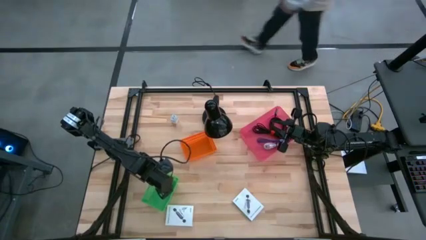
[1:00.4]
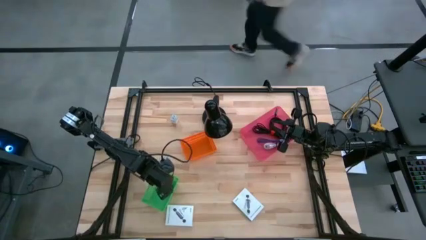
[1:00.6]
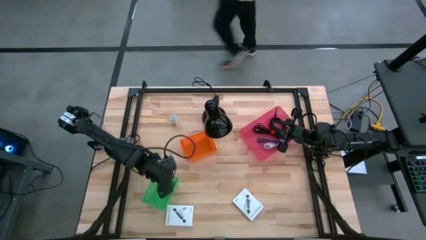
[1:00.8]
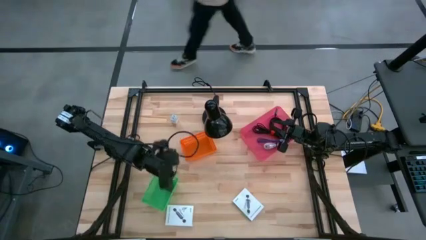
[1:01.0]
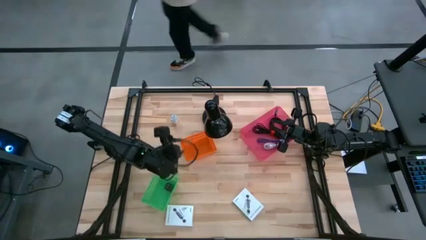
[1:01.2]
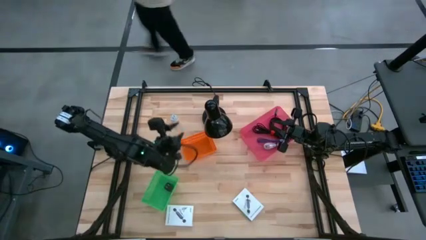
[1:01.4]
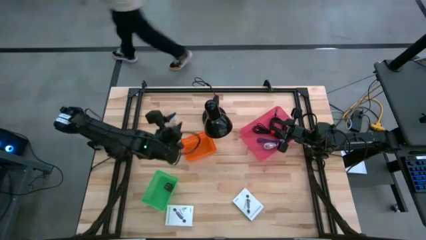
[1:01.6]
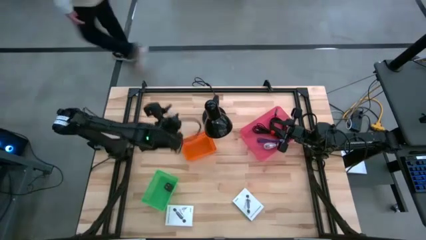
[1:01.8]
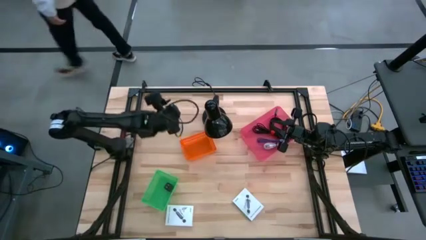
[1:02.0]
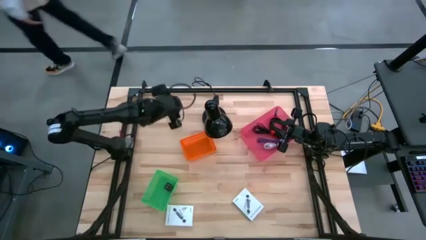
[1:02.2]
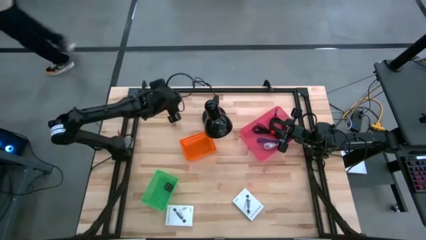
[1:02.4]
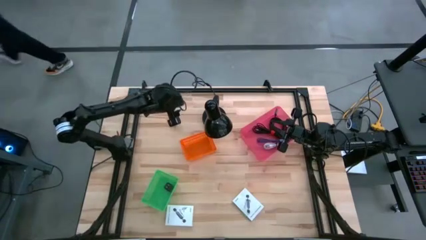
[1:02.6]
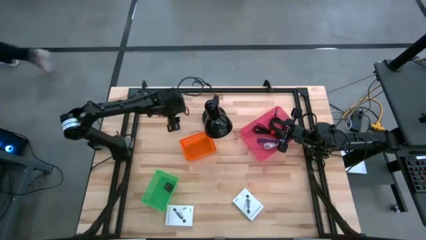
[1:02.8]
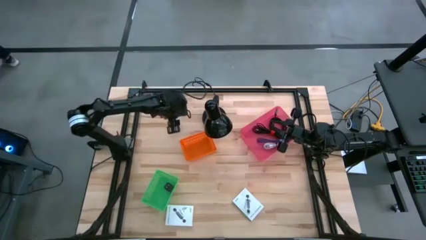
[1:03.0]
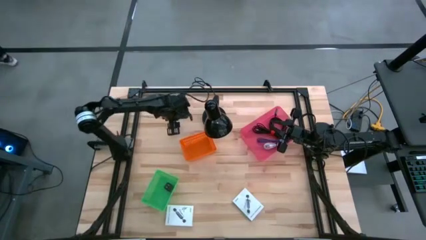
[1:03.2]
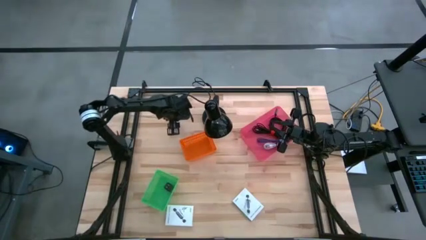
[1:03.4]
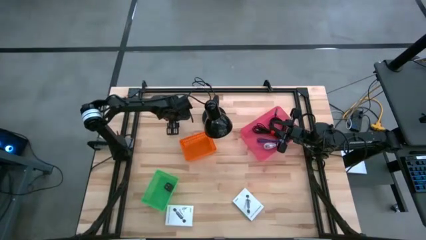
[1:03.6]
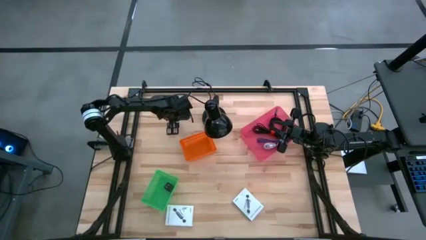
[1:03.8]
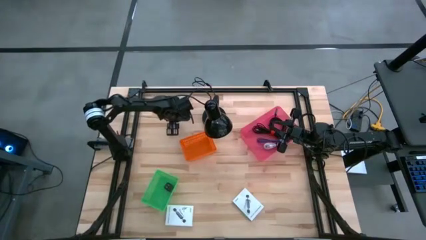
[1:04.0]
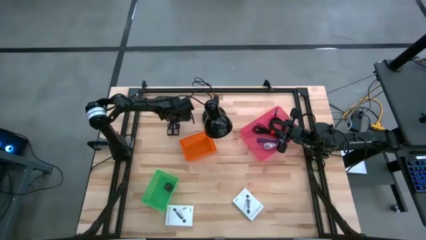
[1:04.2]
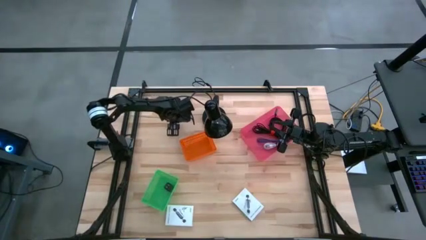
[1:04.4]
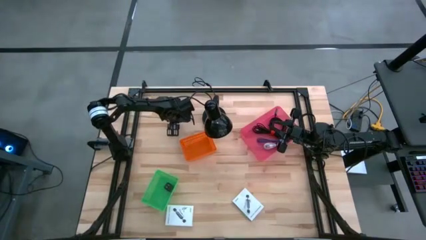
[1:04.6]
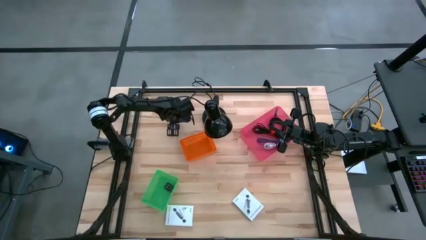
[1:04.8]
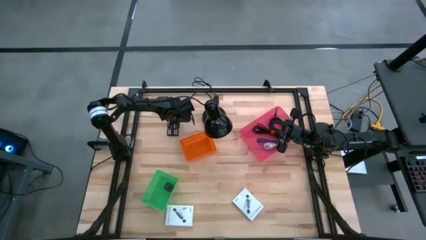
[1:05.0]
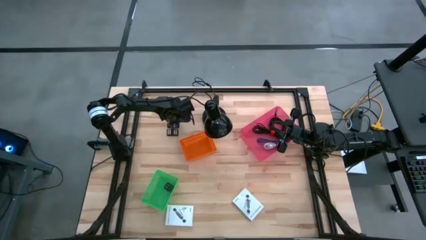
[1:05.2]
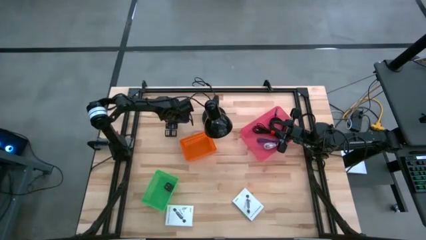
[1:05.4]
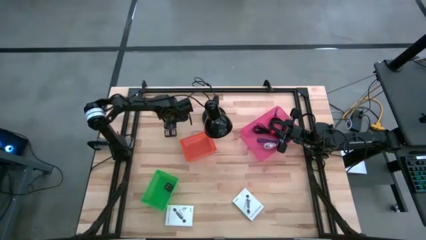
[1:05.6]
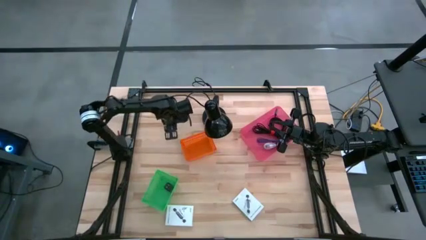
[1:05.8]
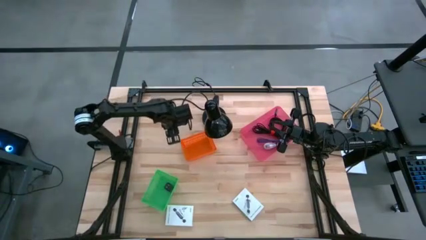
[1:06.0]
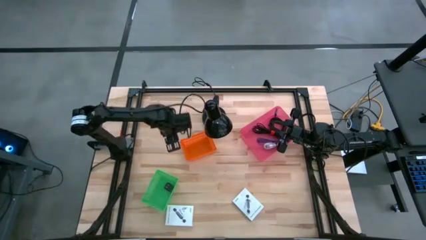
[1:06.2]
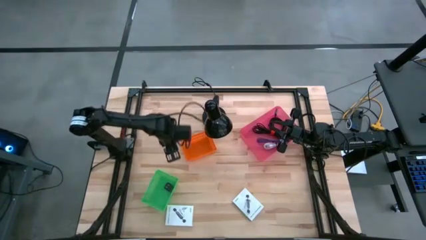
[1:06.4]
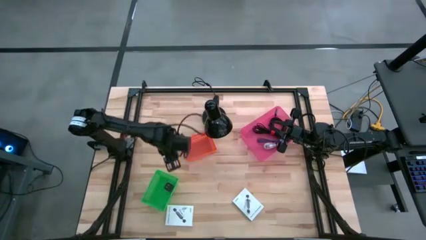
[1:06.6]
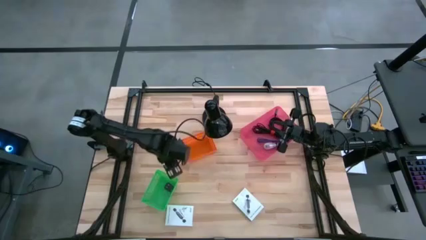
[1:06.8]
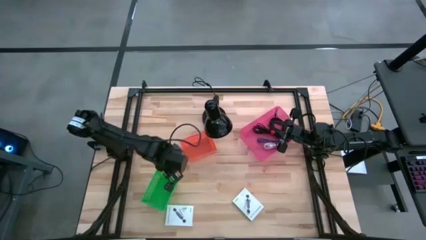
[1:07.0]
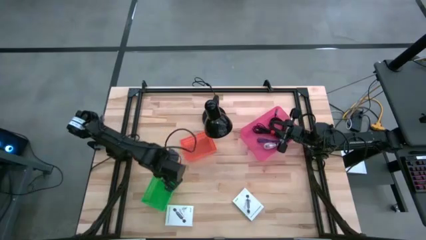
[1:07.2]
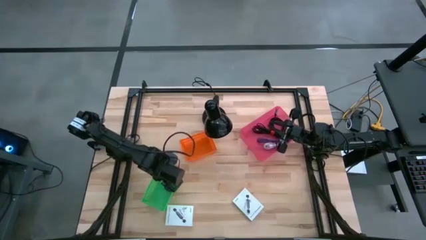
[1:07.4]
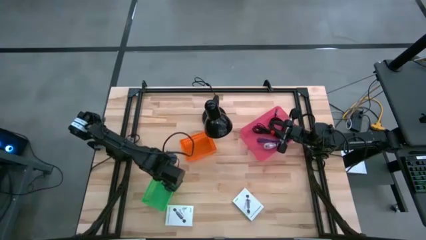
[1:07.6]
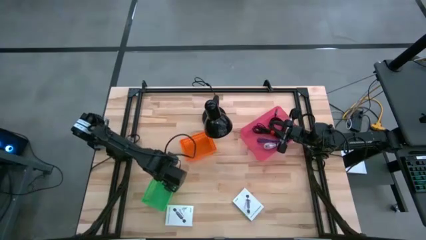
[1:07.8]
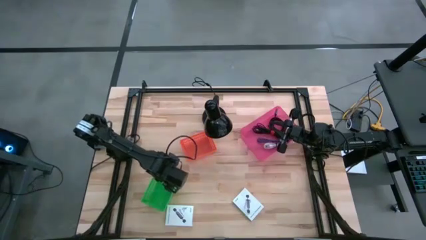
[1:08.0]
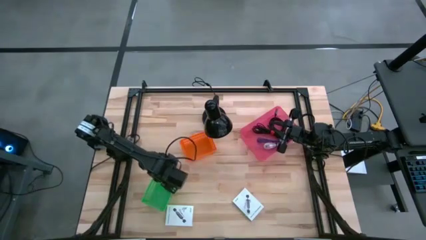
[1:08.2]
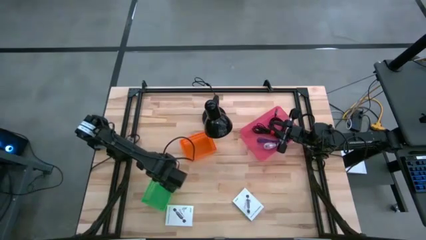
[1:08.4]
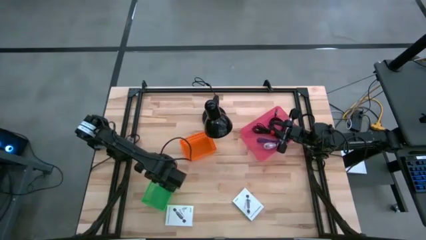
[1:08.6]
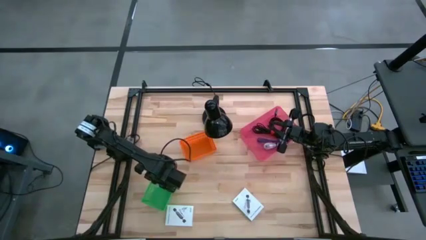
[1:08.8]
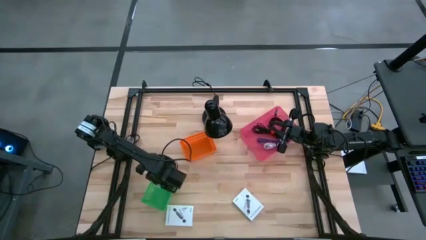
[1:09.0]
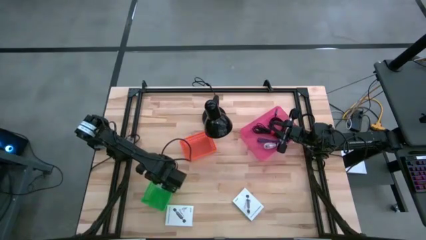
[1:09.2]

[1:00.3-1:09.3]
Task: Pick and place items into bin
Put the white charger adapter into the green bin

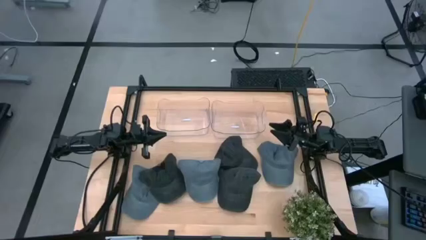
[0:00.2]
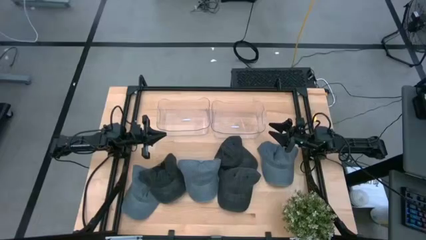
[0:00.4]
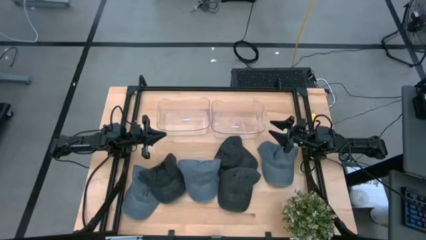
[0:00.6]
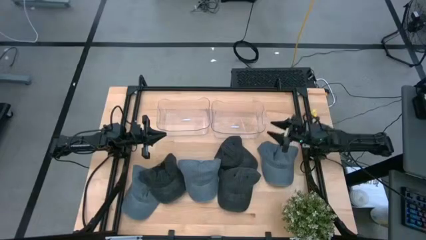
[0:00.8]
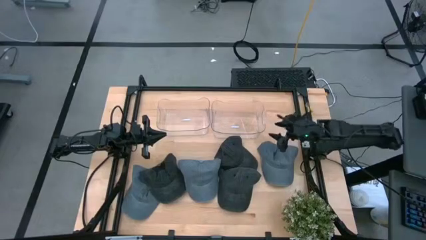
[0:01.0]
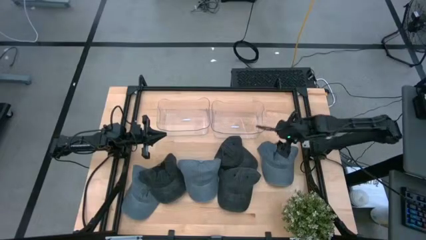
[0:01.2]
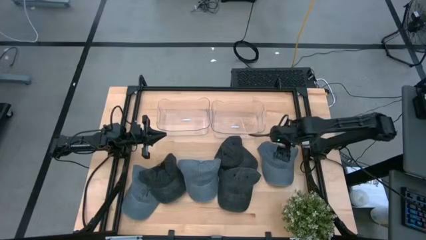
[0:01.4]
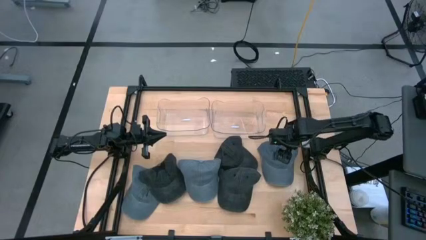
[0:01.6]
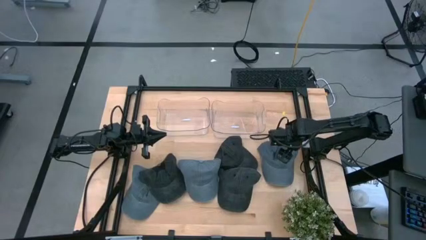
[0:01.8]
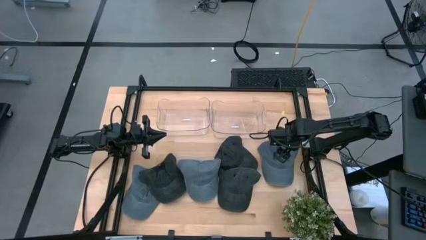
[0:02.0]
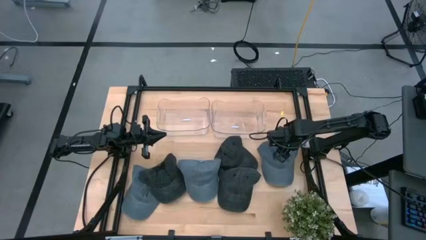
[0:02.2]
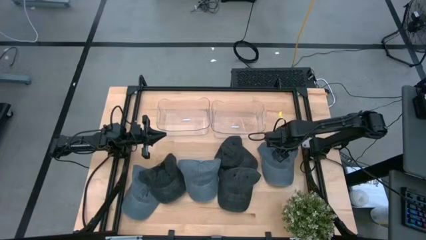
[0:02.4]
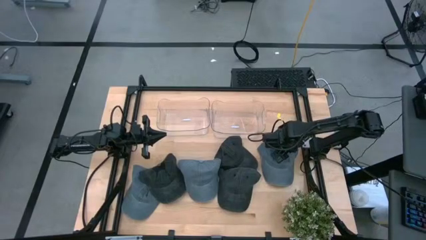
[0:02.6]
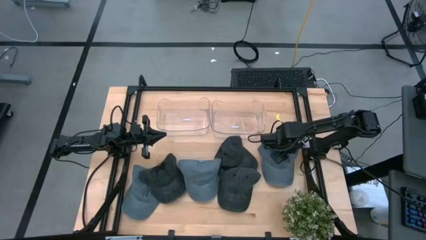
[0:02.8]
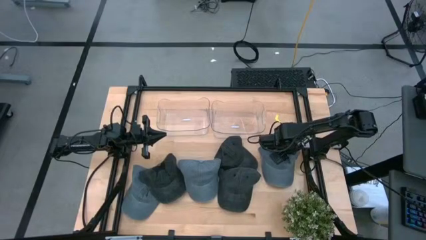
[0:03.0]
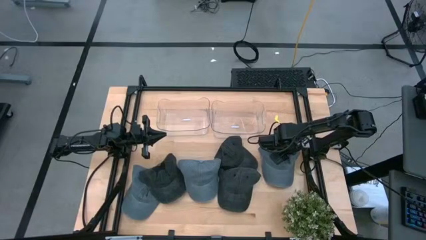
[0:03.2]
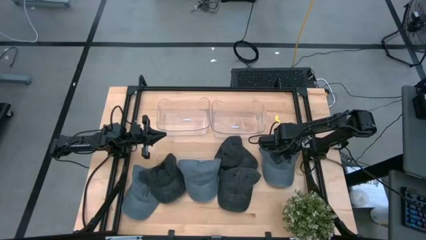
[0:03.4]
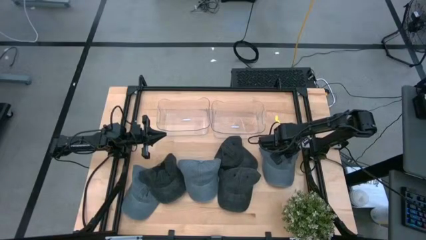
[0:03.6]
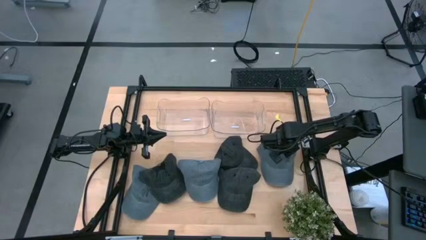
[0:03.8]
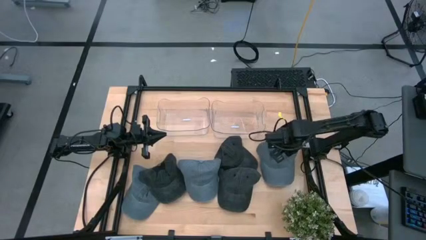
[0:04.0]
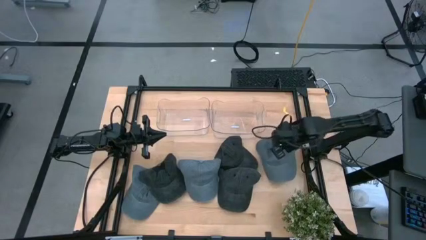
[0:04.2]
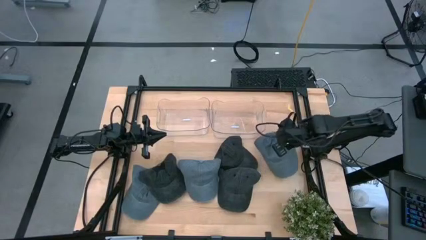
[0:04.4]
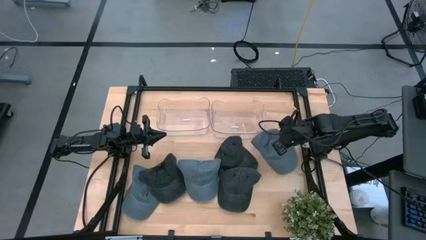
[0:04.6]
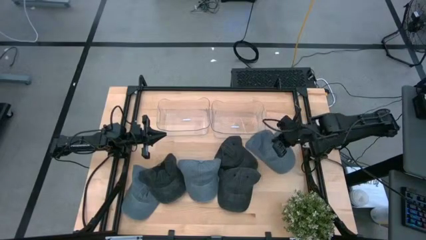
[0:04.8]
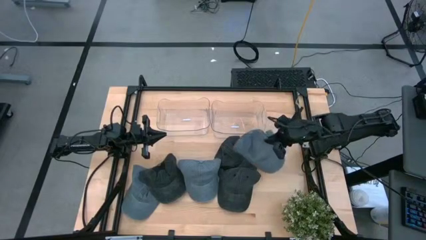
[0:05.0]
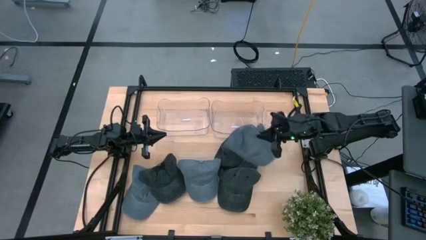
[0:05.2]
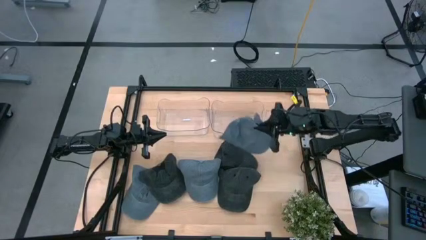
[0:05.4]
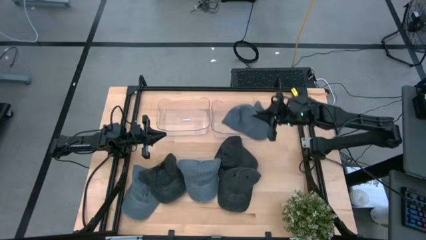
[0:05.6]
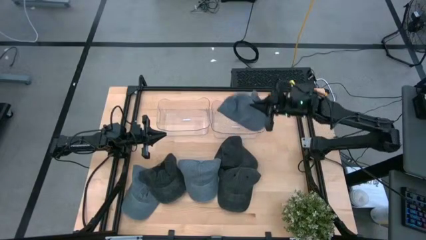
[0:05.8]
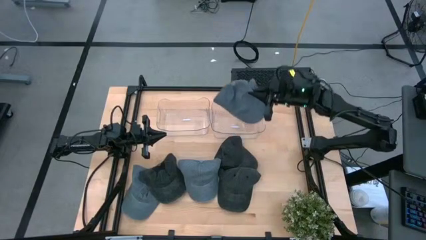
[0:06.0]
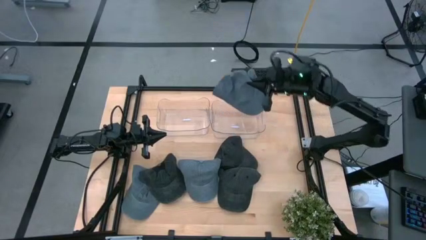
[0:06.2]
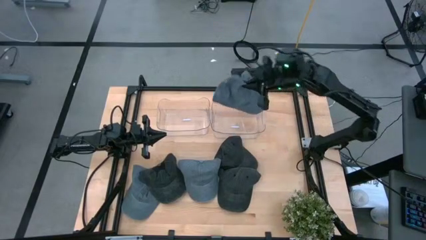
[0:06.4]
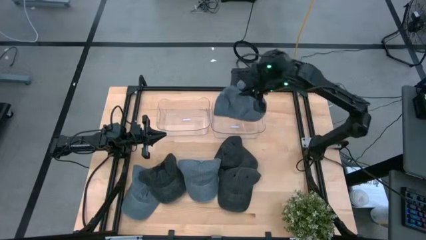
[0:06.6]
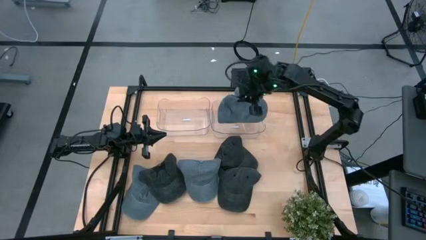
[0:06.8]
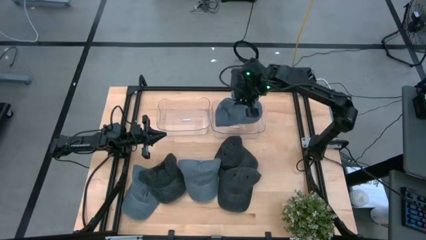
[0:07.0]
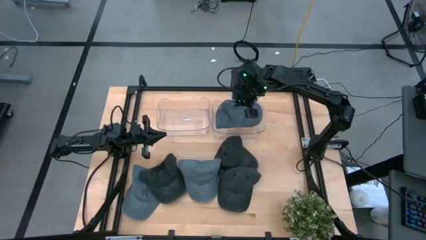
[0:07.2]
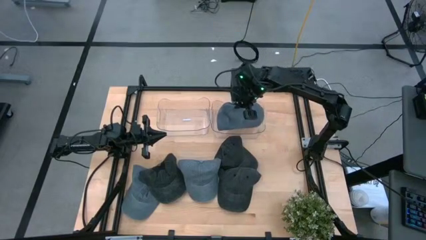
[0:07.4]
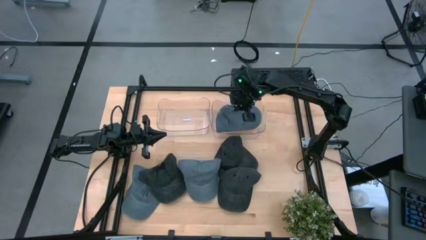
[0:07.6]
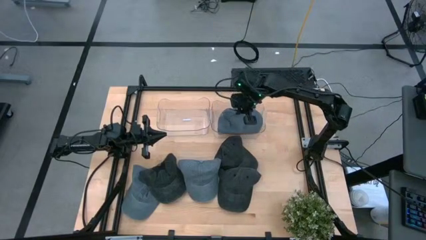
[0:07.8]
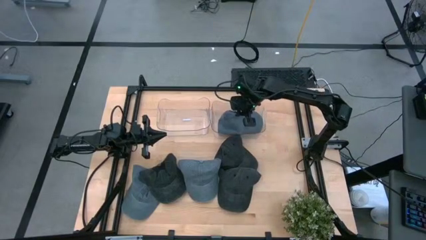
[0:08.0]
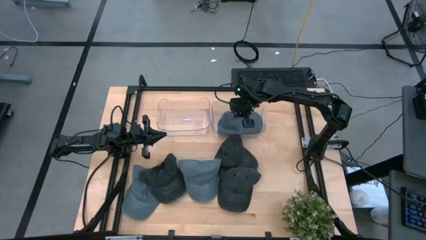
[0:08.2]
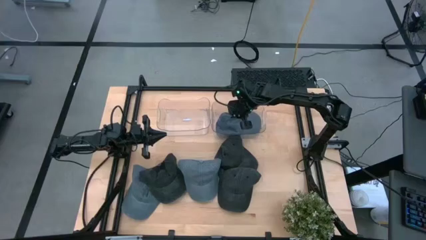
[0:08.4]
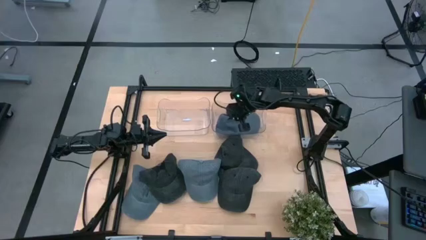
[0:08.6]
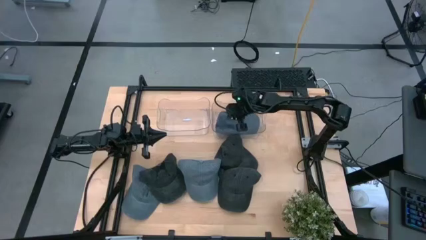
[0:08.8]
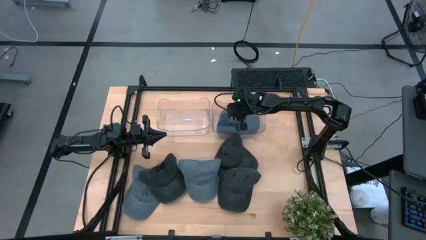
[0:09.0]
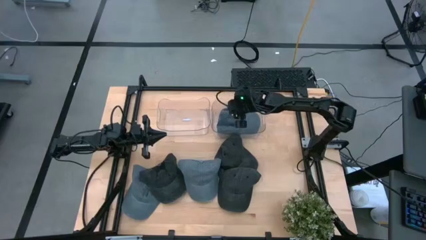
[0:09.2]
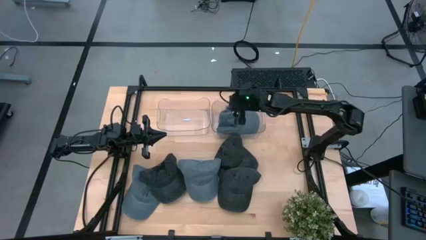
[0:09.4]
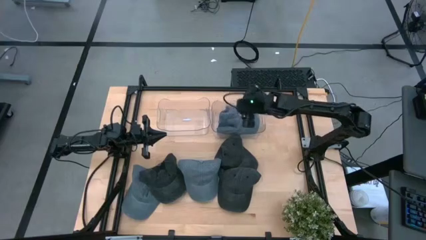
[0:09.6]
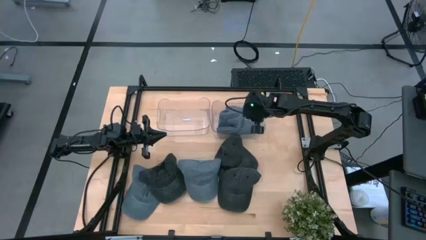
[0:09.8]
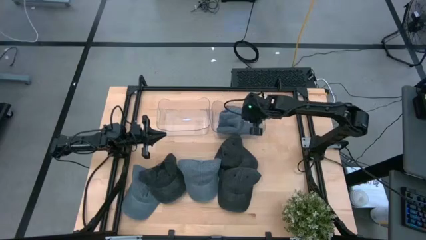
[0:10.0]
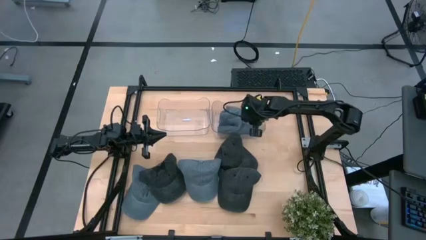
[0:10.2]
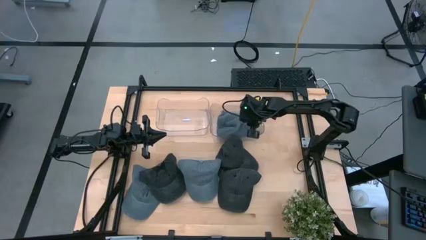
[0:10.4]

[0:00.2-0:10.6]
Task: Pick & Place hat
Put the right blue cap into the right transparent bin
